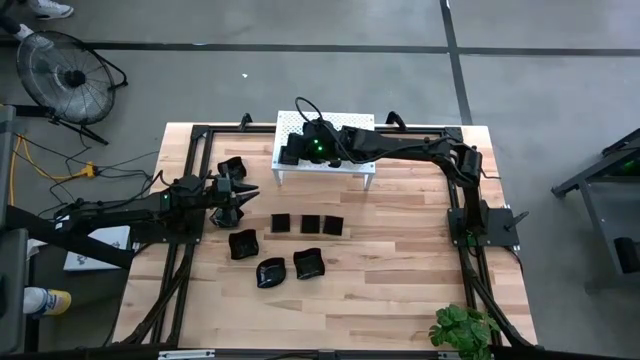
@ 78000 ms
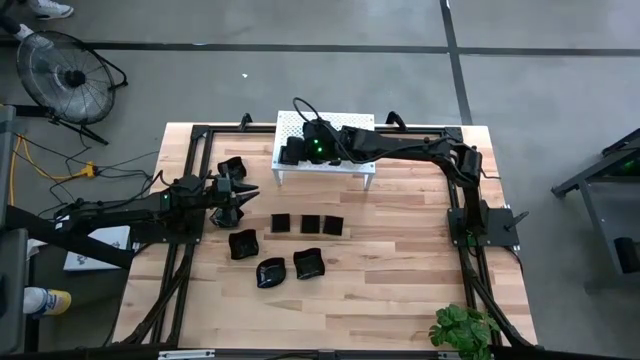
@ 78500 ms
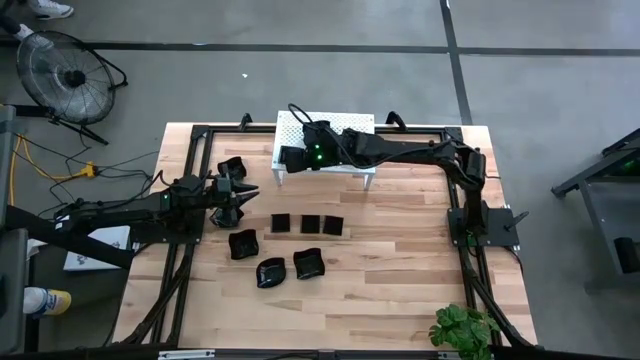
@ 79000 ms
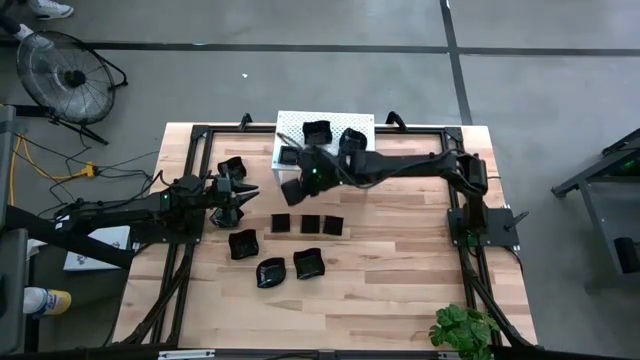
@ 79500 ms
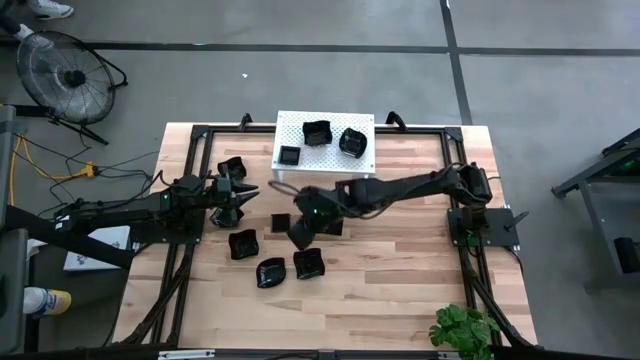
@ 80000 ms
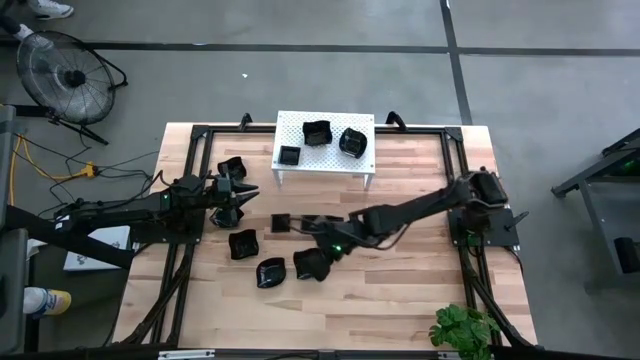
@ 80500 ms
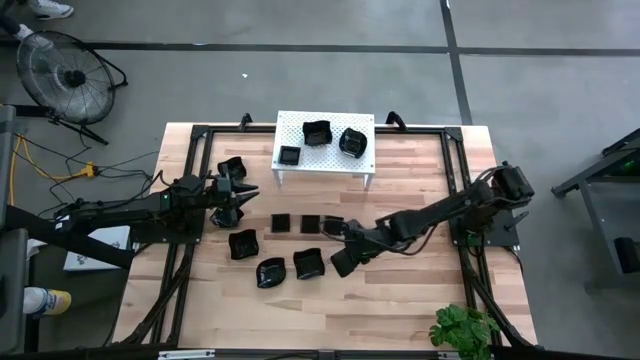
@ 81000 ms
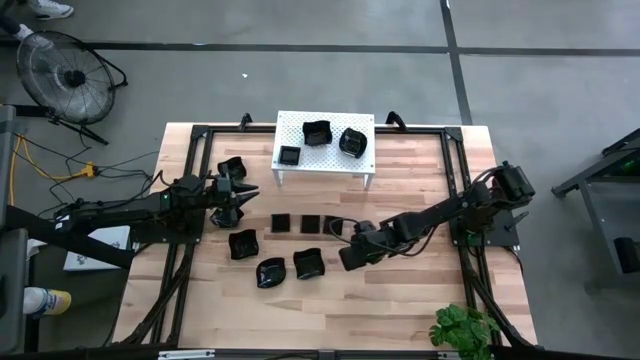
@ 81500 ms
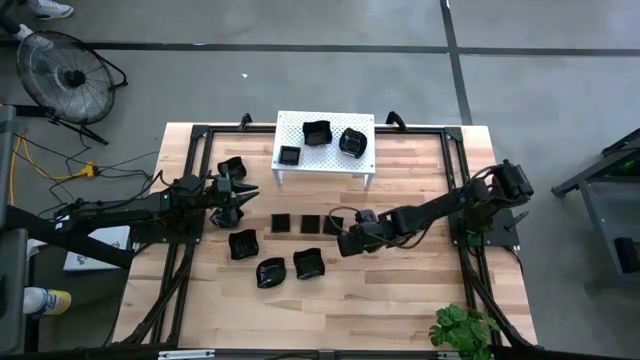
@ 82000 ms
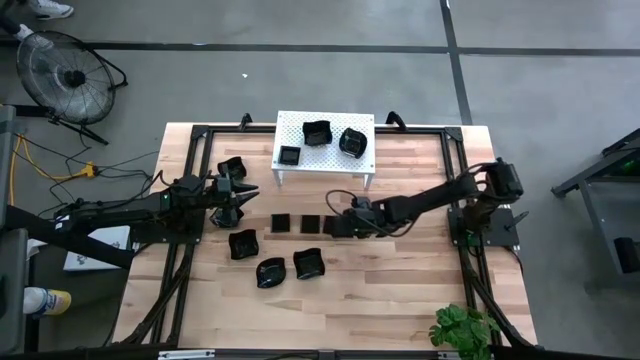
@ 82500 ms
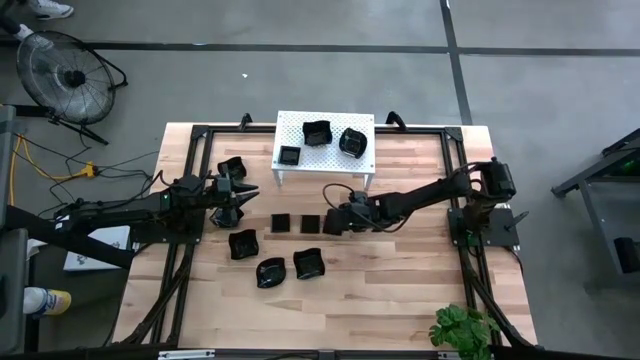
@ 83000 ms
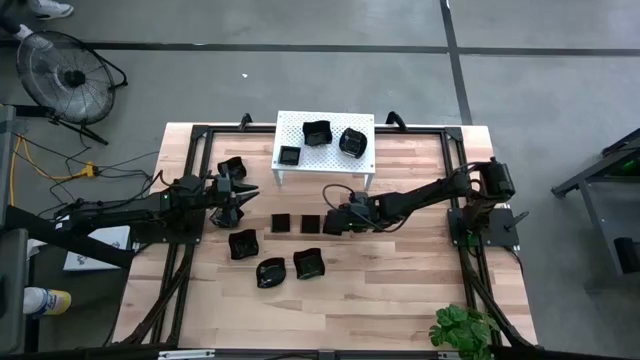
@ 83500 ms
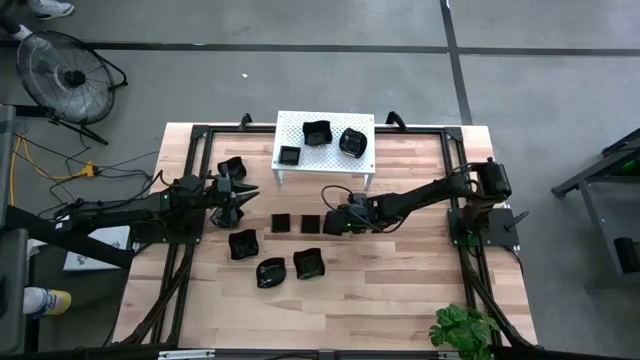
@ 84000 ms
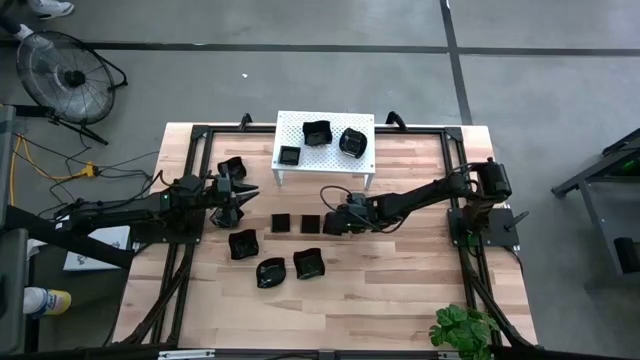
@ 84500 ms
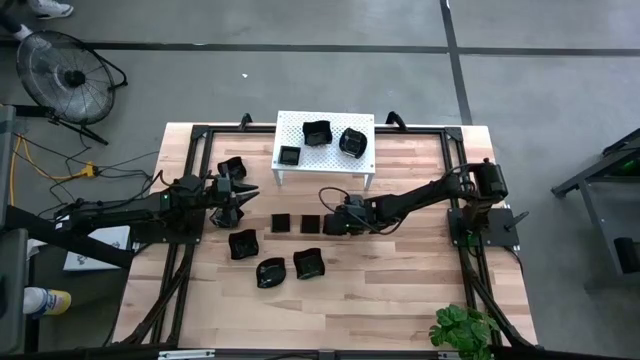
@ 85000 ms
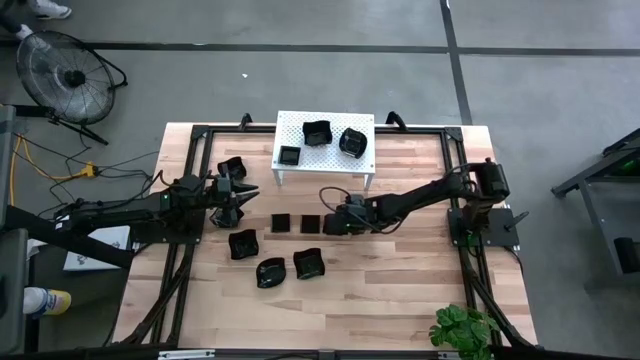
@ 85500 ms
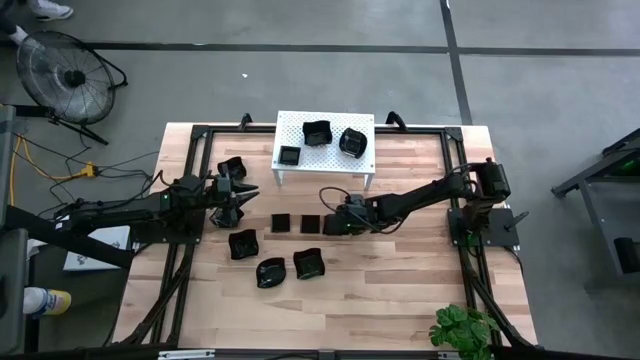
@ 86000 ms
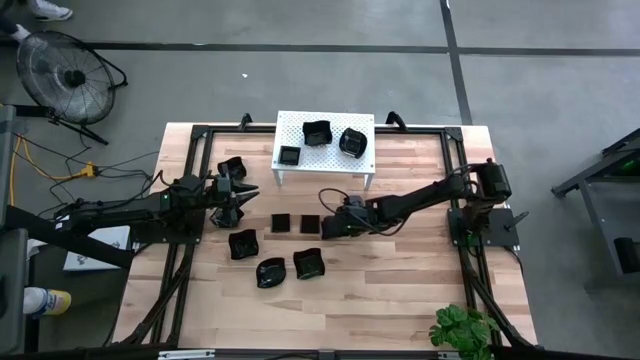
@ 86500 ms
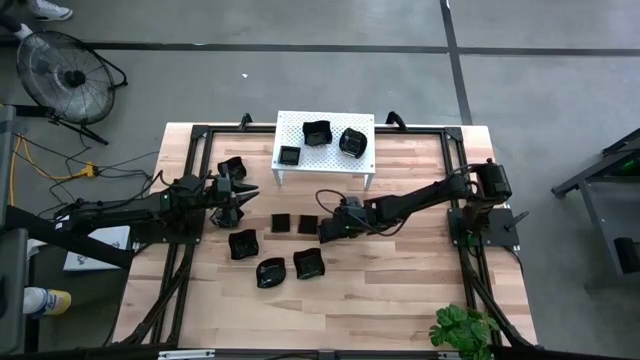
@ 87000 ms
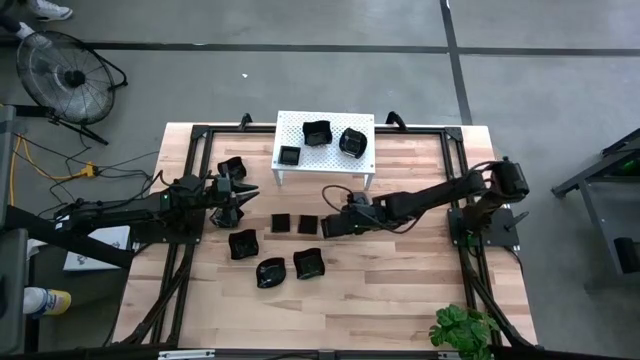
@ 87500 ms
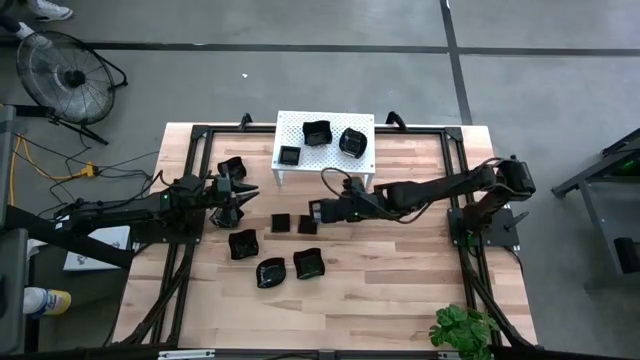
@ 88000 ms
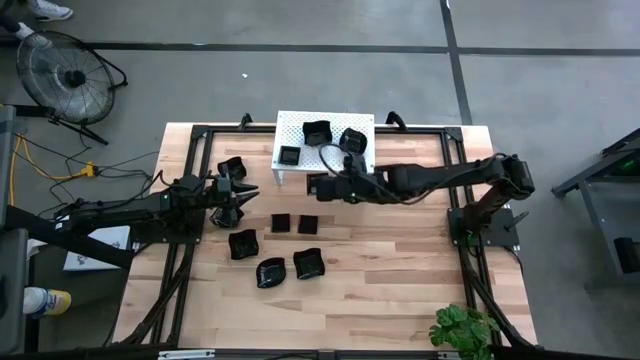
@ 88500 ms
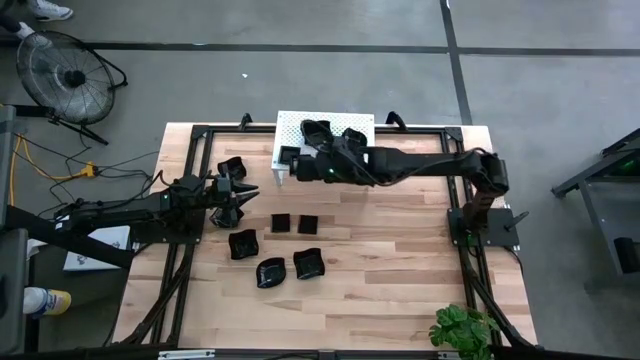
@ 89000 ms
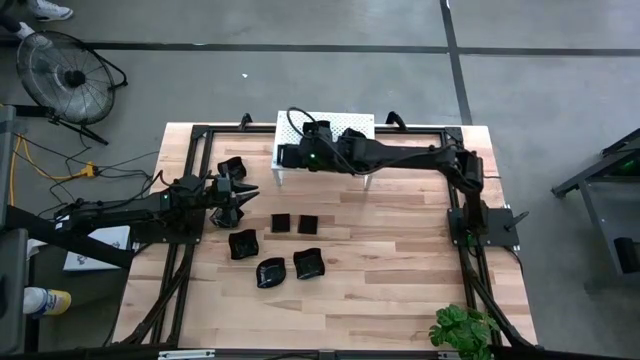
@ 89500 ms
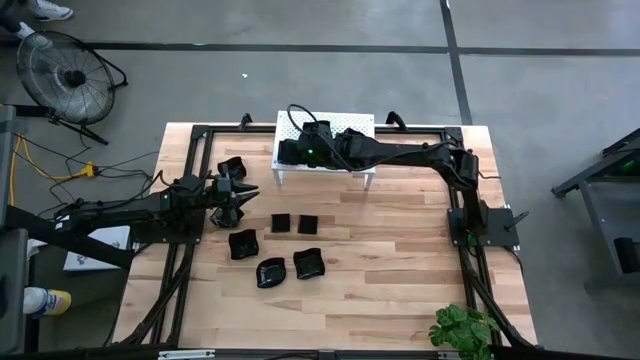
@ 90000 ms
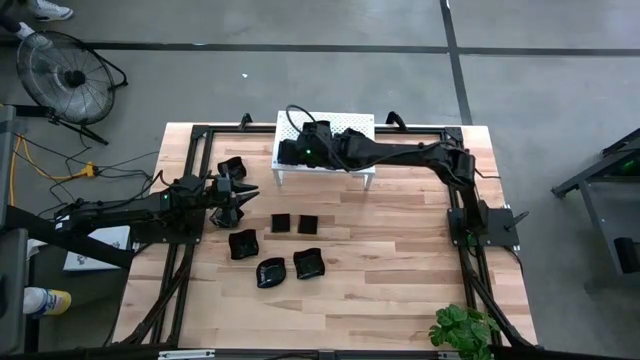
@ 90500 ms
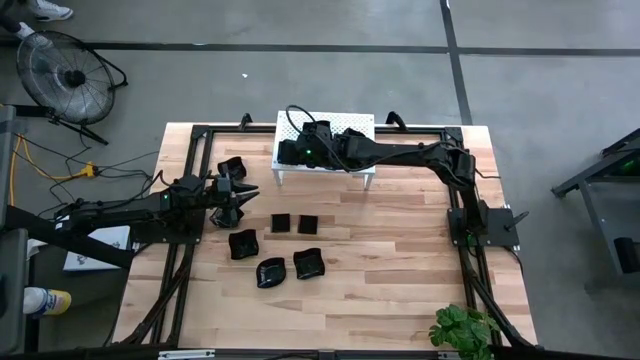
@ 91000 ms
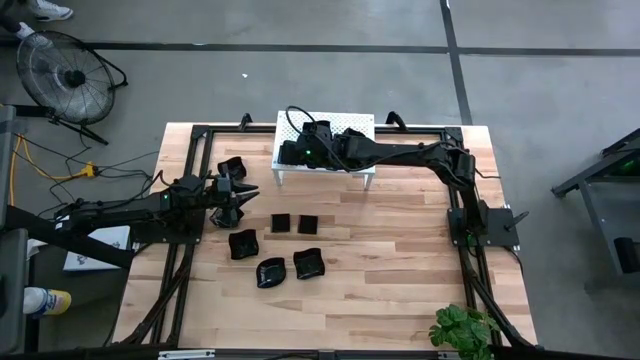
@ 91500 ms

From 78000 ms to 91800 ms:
Task: Pick & Place Mini shaped plates
Stack the square plate on top of the other square plates on the shelf

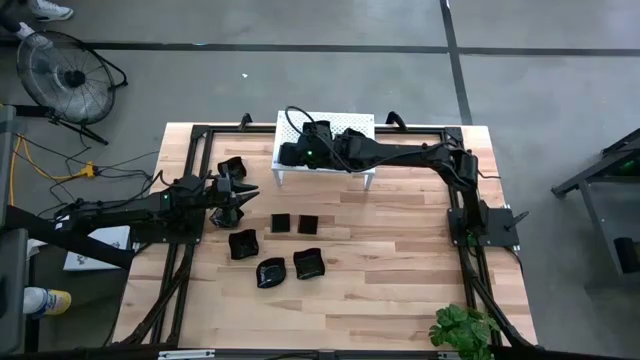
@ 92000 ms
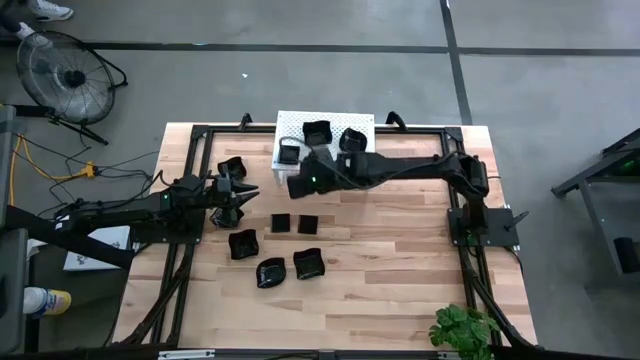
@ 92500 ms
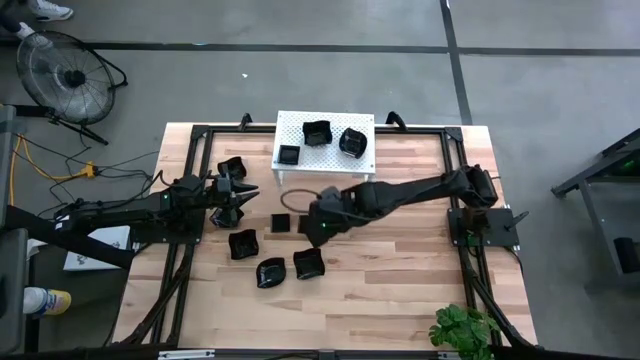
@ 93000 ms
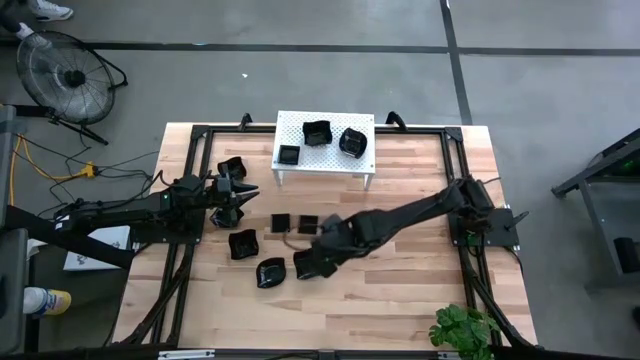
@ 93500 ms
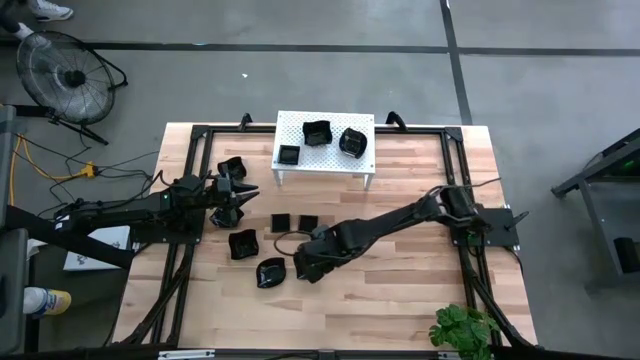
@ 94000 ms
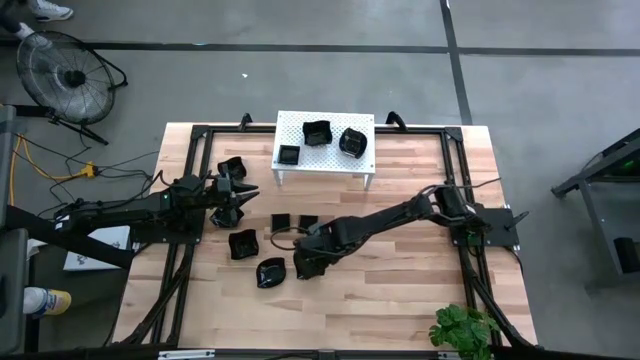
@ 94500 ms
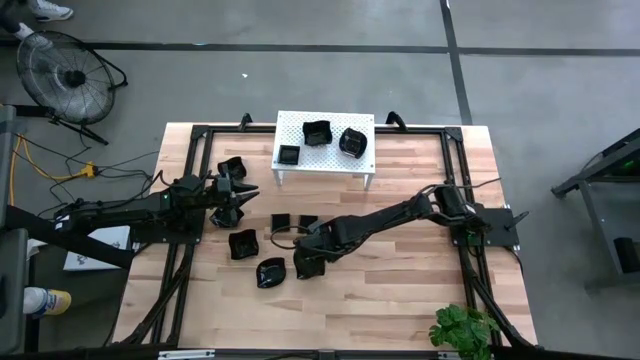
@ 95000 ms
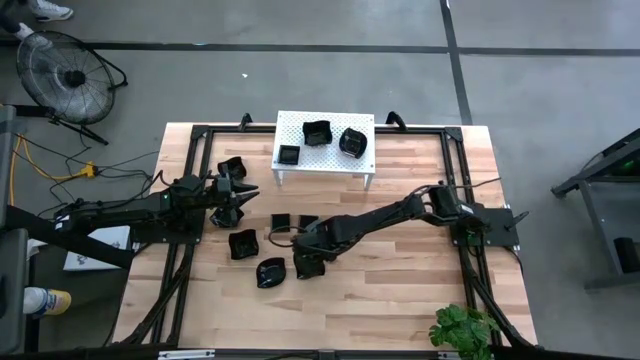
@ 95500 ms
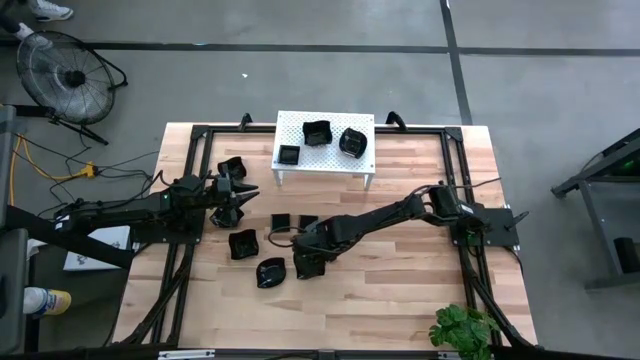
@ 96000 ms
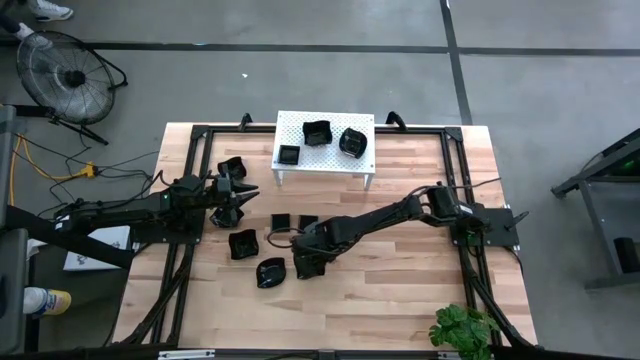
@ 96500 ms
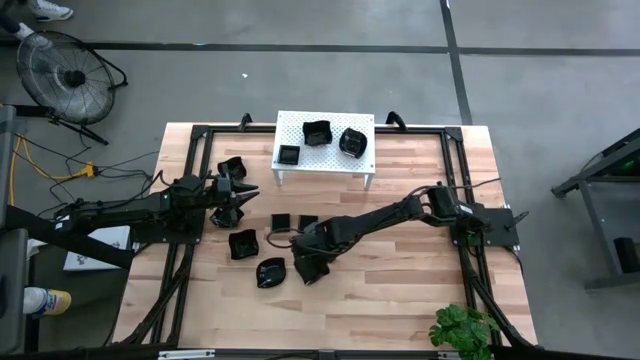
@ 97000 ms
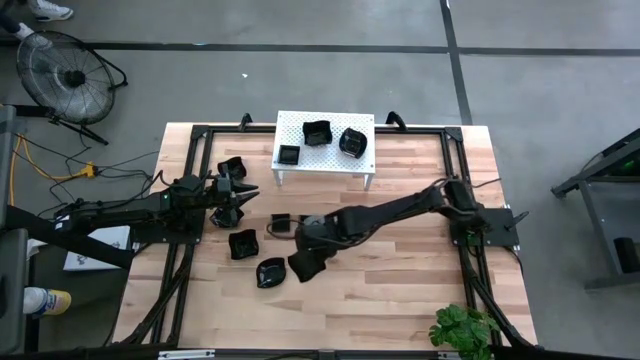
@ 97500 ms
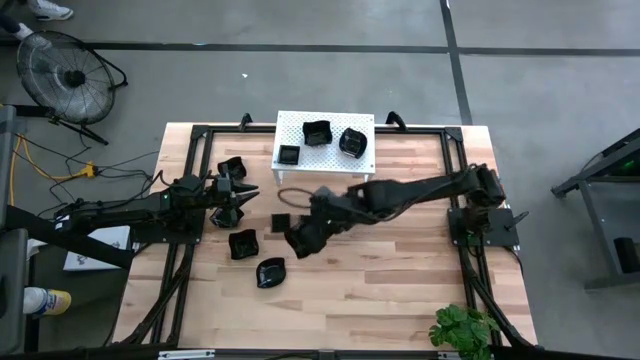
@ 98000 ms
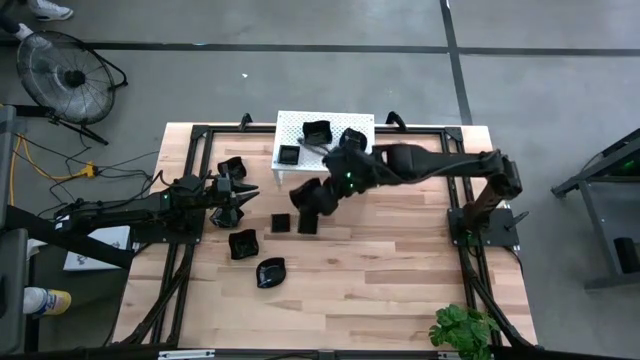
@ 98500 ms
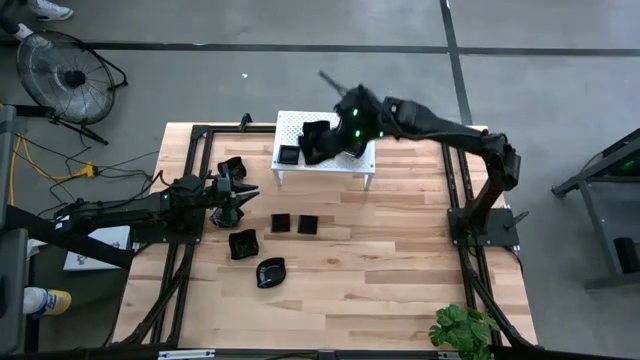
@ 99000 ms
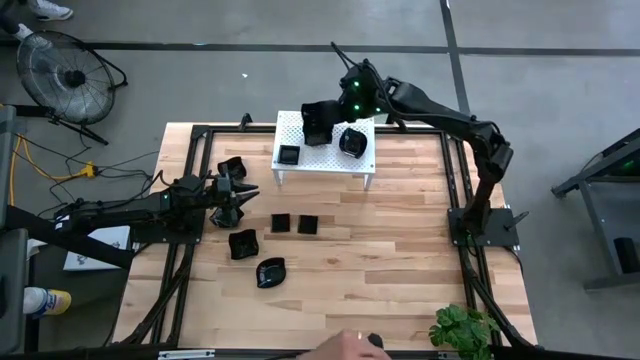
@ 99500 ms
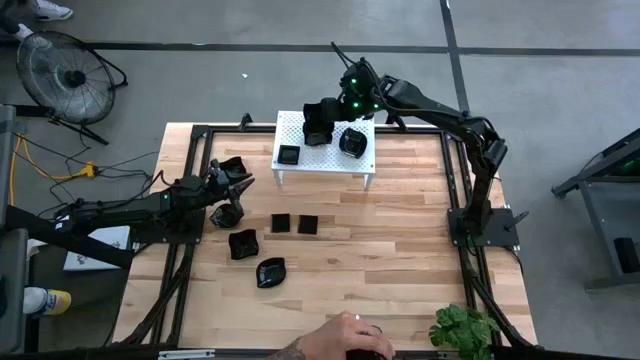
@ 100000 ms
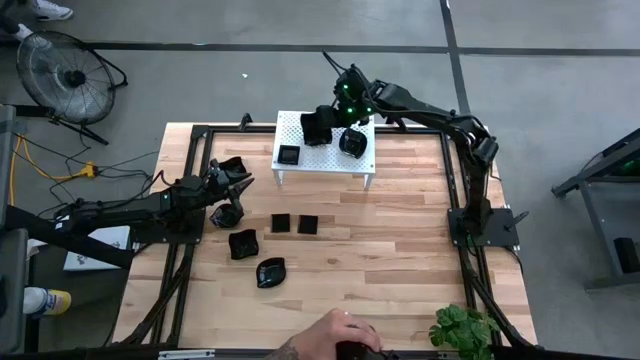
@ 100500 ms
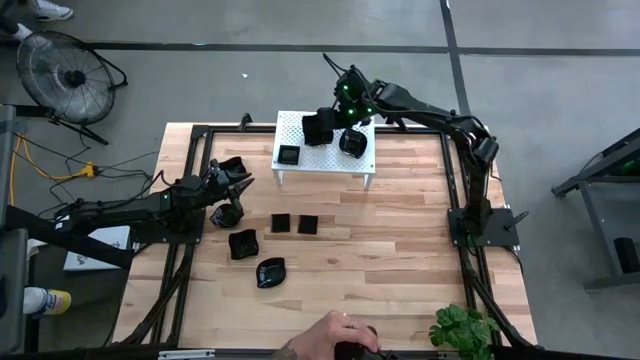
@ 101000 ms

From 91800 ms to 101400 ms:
Stack the distorted square plate on top of the other distorted square plates on the shelf
